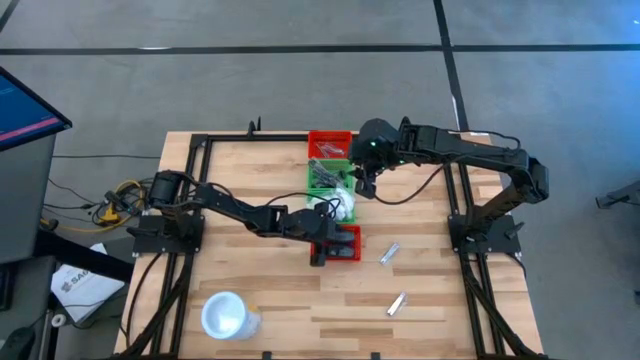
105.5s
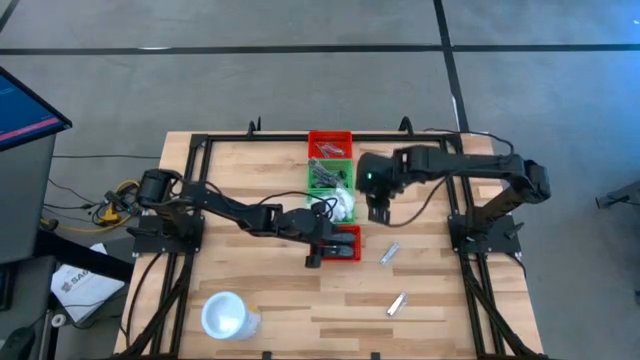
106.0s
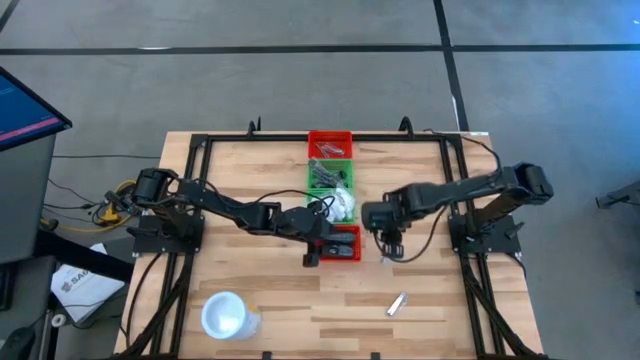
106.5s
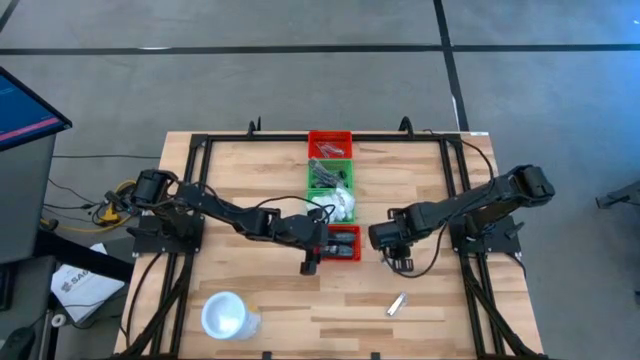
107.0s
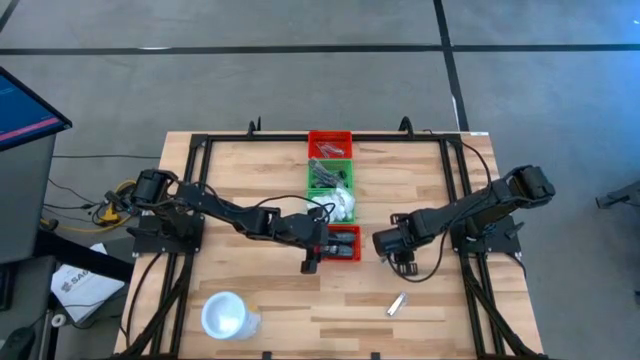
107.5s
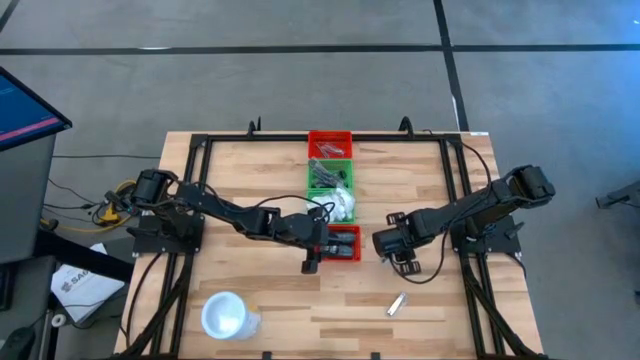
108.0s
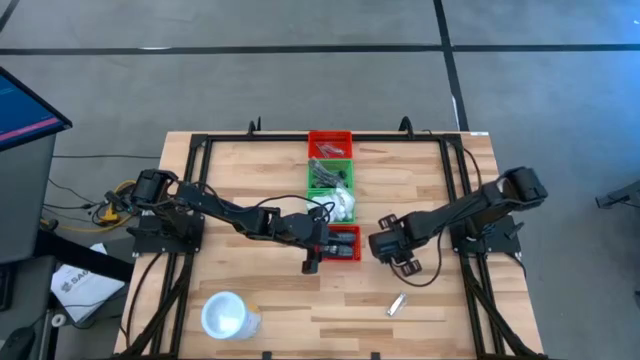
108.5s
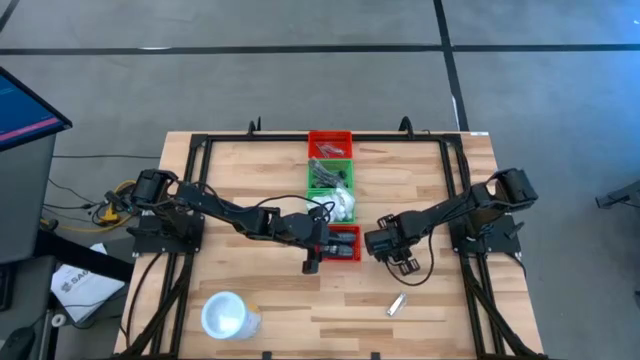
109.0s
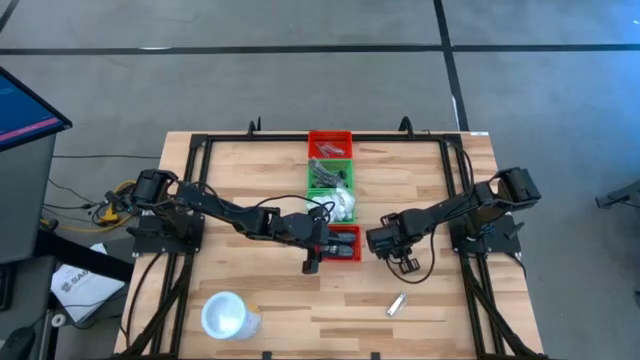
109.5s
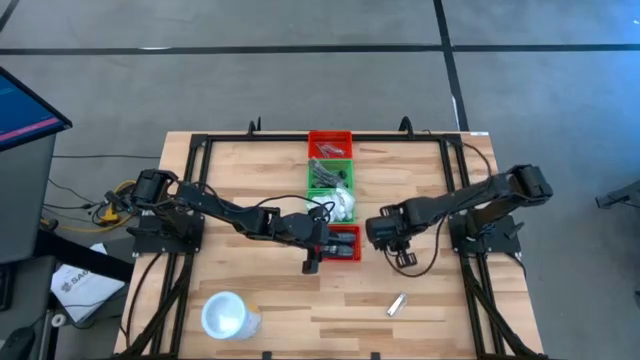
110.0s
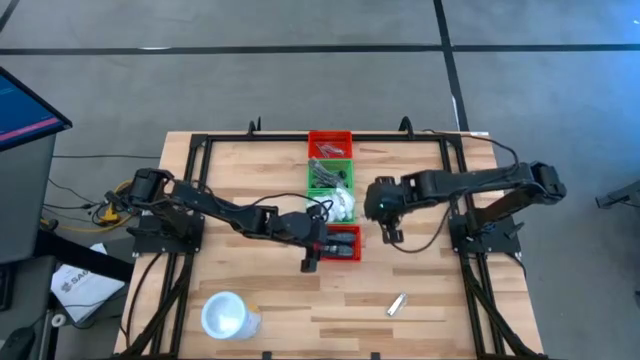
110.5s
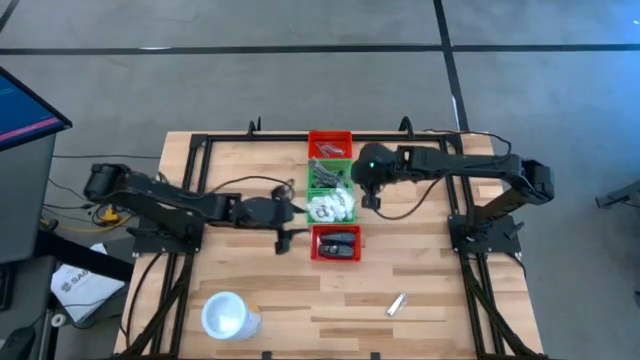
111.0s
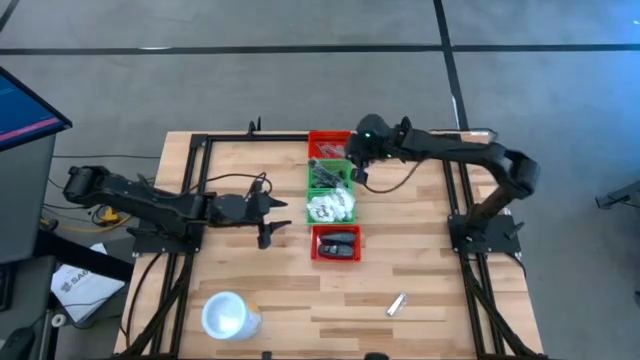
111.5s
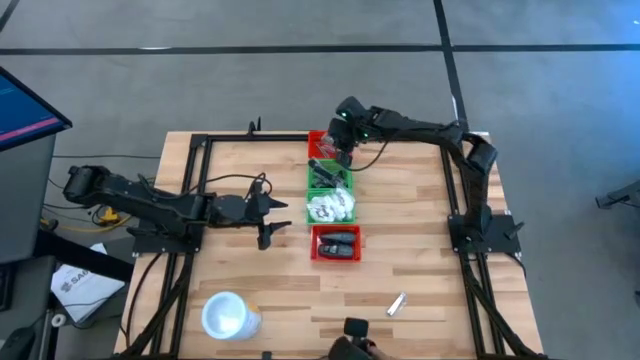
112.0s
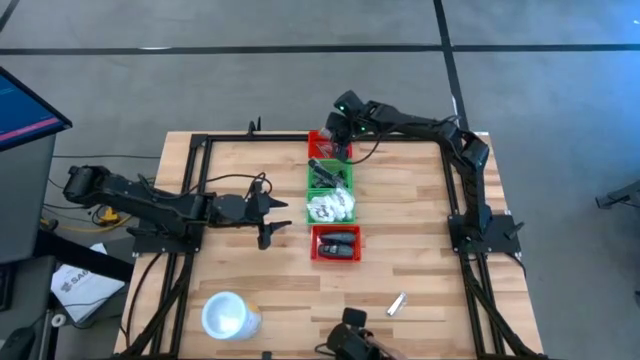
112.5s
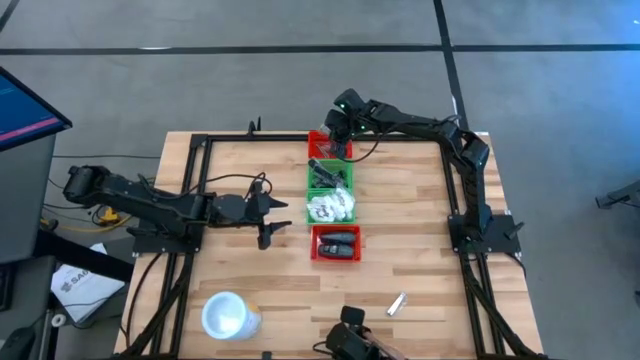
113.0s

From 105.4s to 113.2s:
Task: Pick & Place Travel size toiletries
Put the silver nail cutter into the top red bin

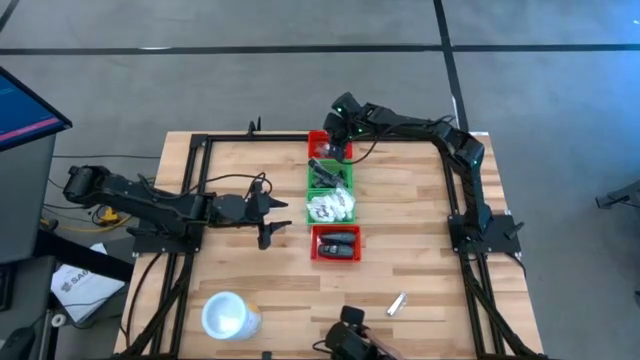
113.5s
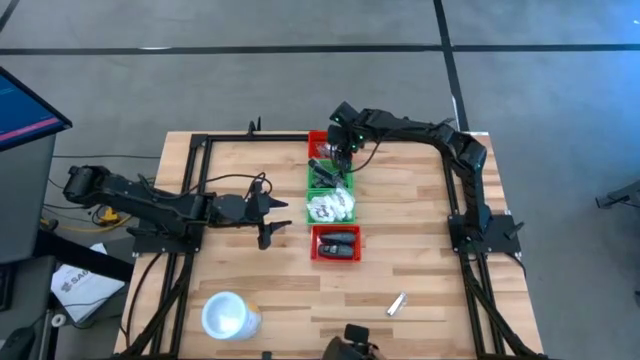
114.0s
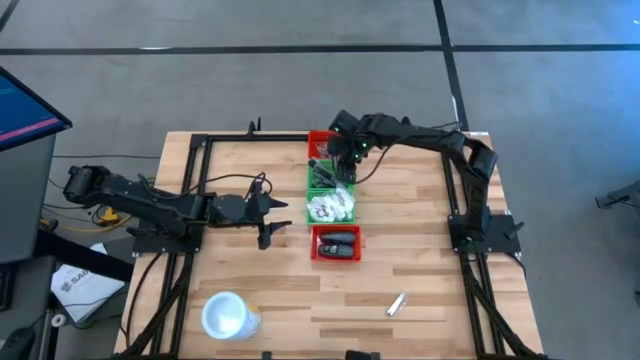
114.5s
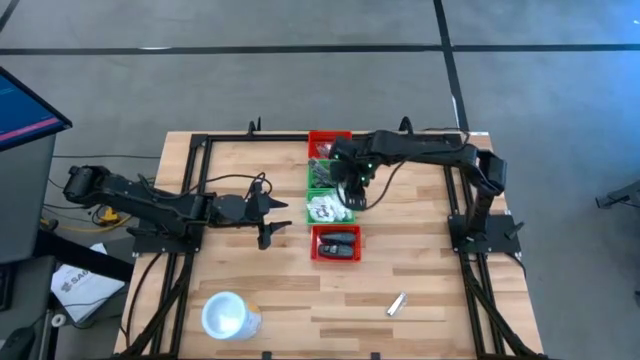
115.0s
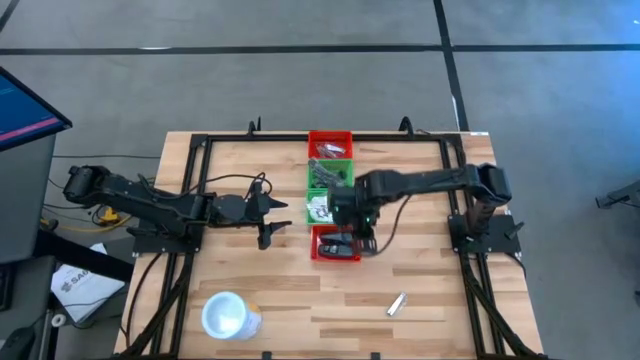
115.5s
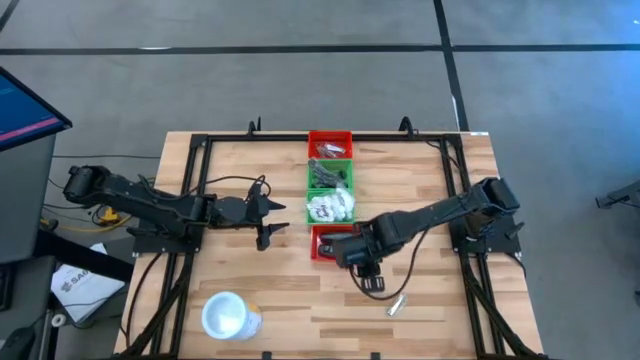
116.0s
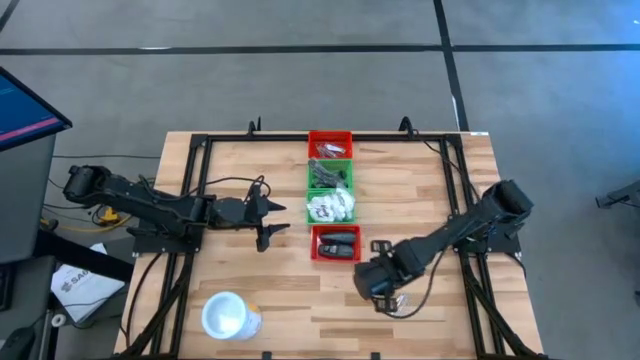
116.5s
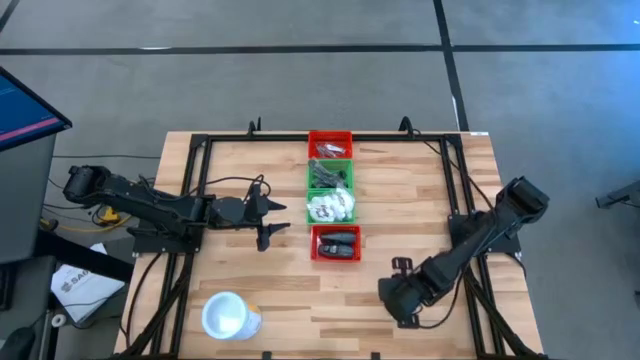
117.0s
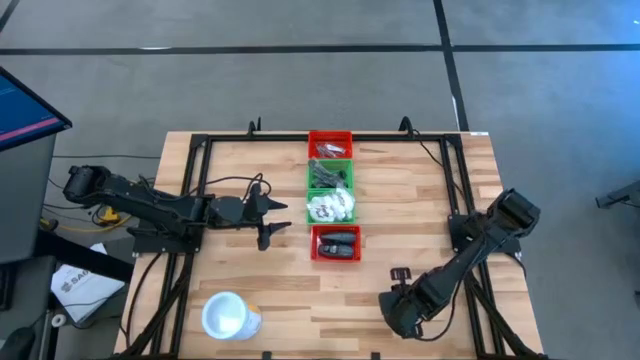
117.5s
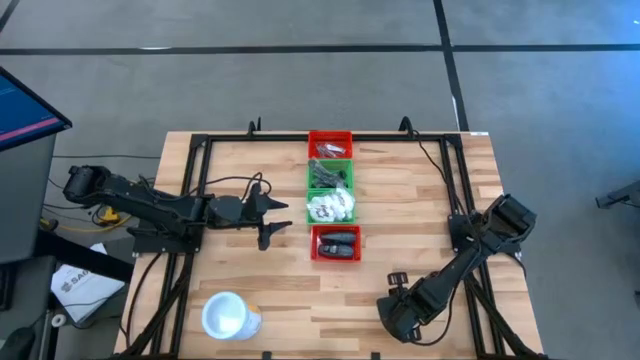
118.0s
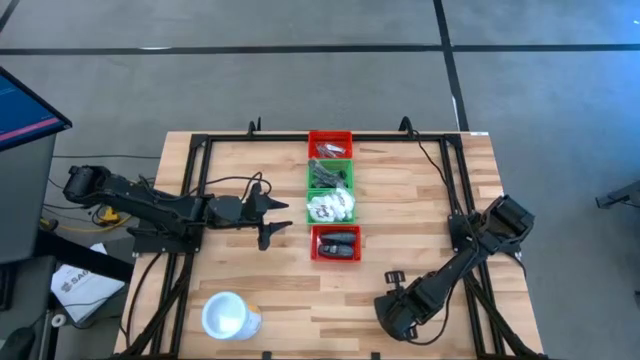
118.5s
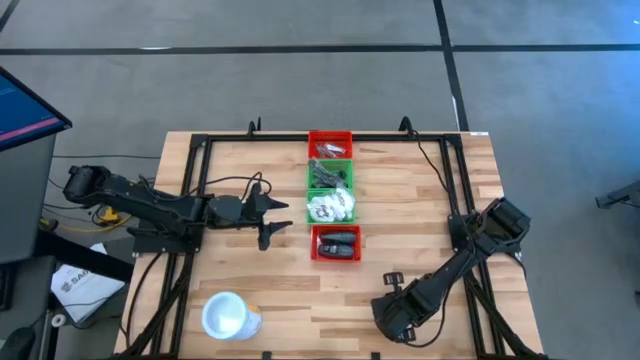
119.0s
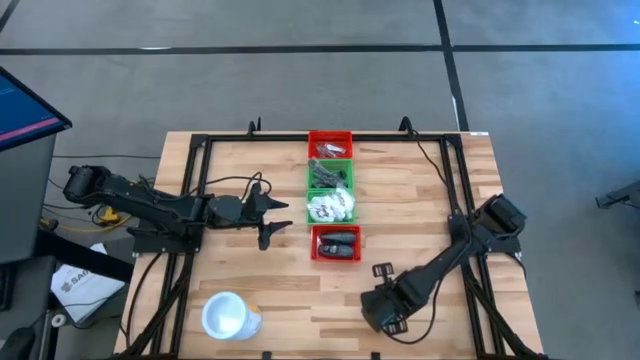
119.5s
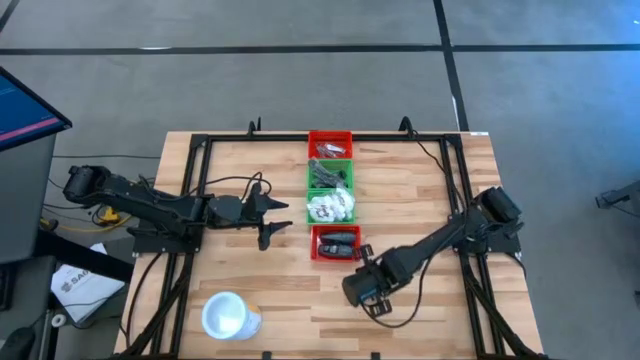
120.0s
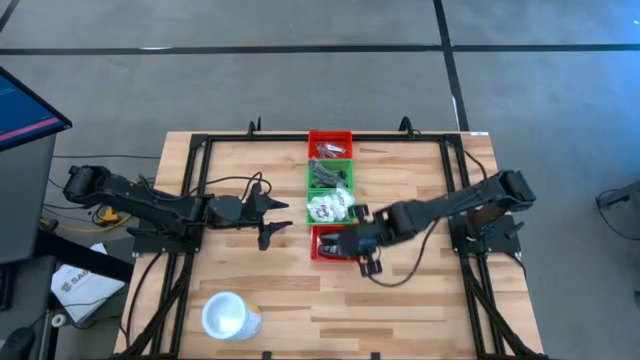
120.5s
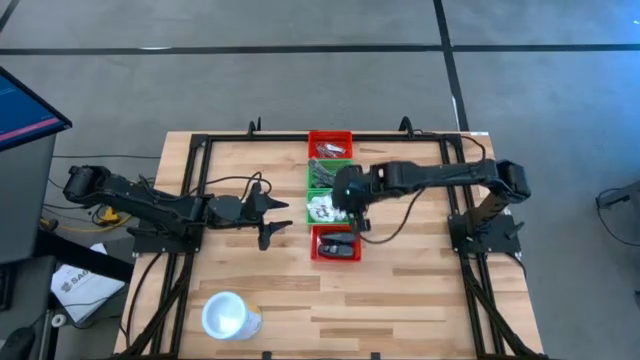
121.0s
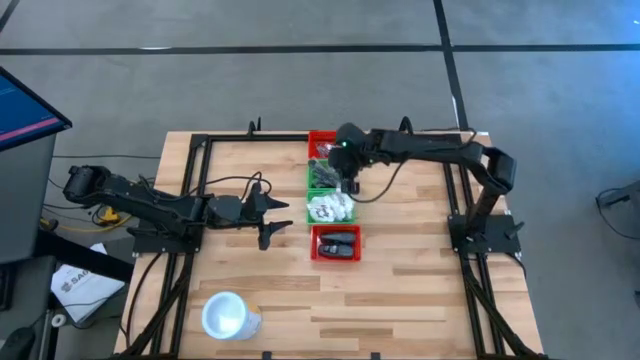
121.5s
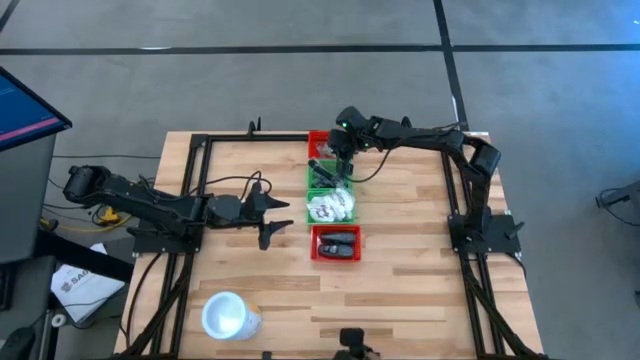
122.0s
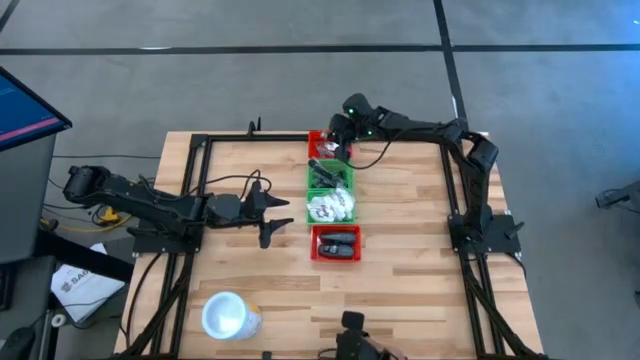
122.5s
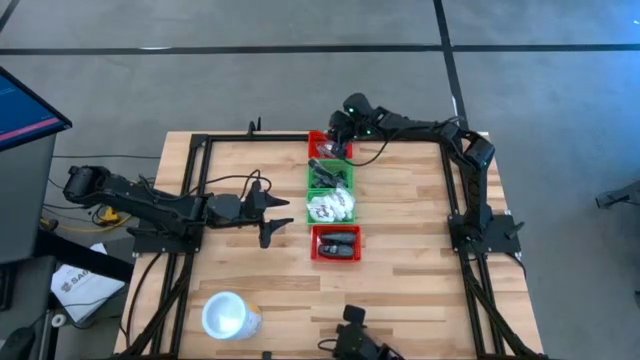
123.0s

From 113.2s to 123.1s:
Put the silver nail cutter into the top red bin

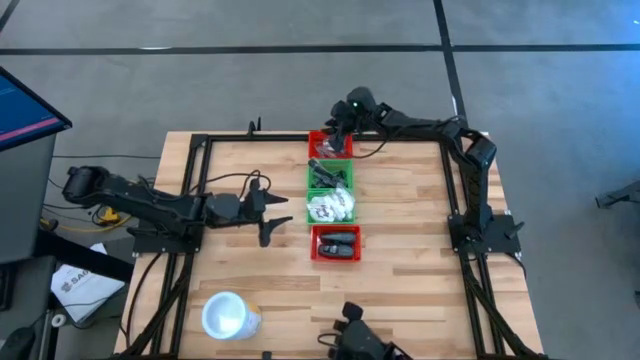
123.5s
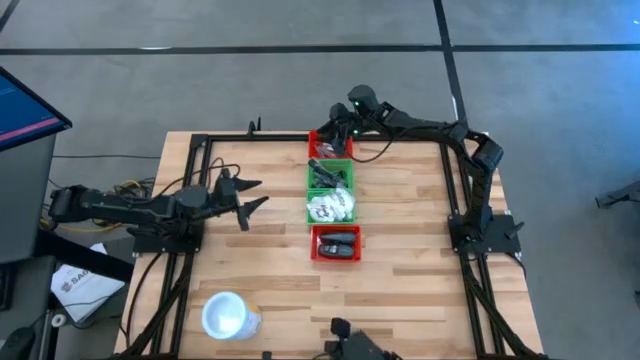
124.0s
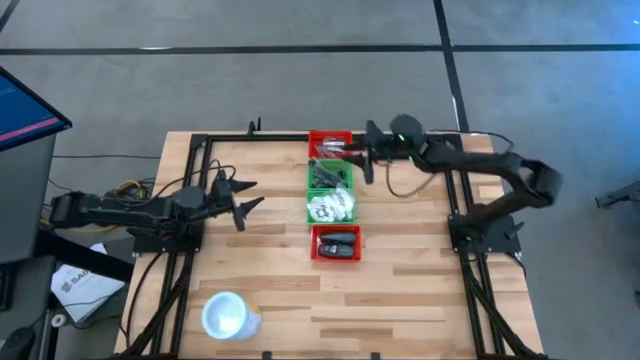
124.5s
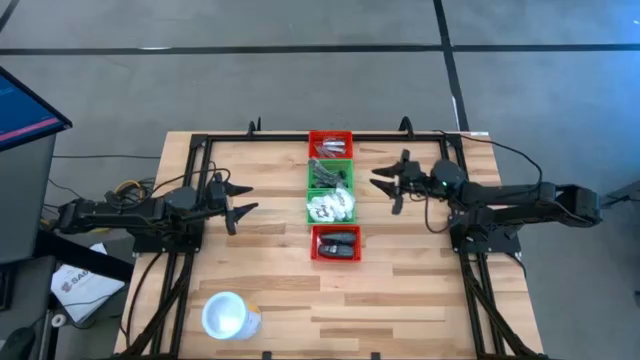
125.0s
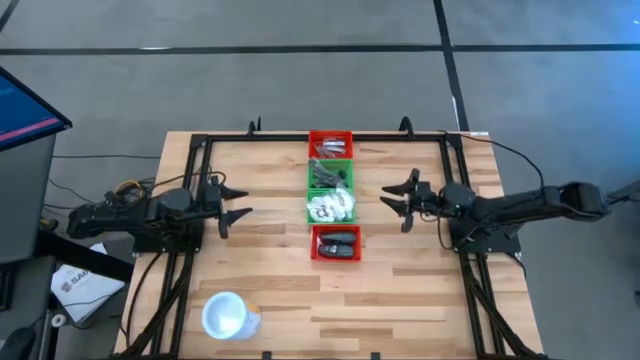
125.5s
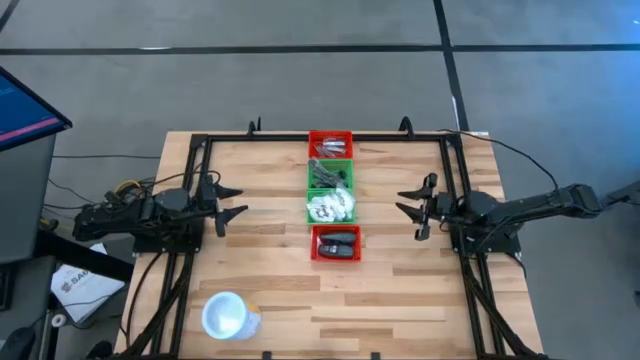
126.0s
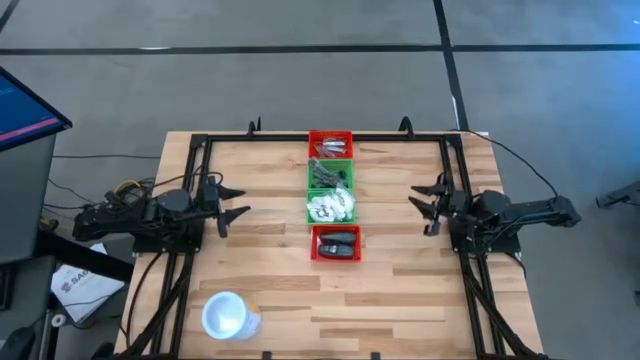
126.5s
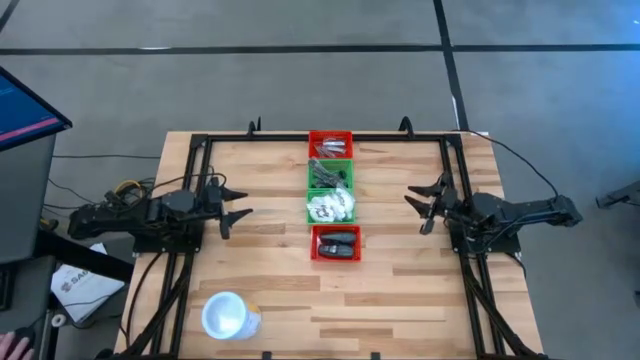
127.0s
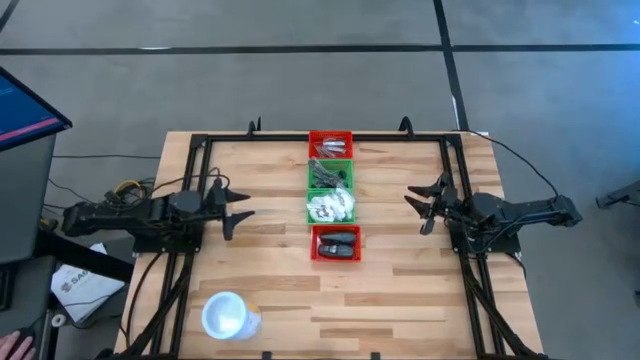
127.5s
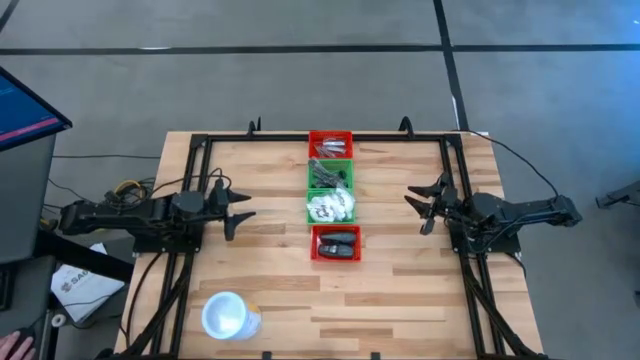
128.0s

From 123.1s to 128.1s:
Return to Home Position
